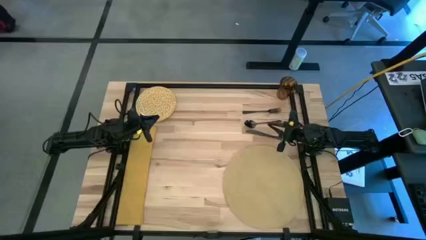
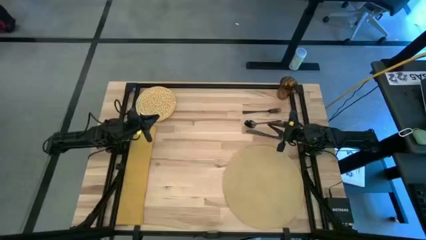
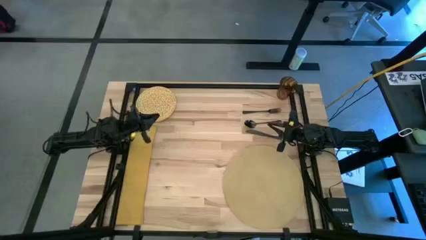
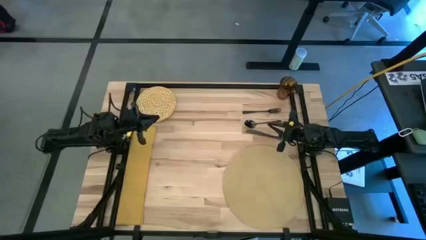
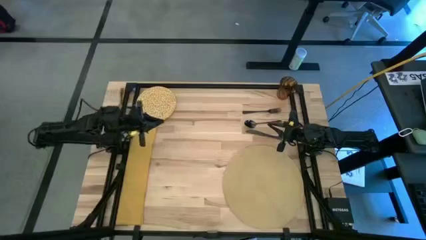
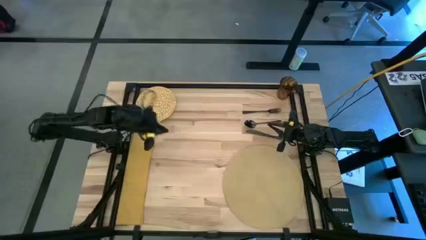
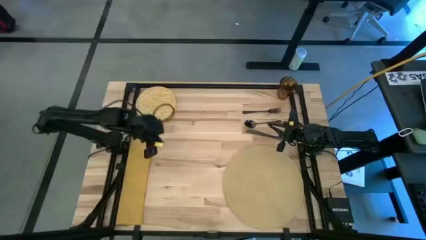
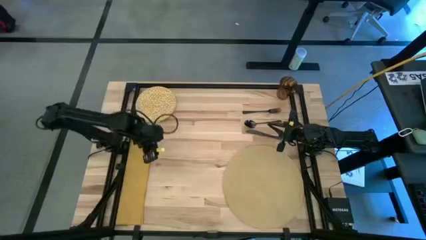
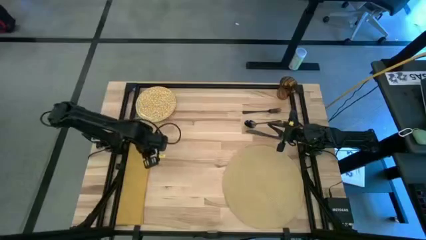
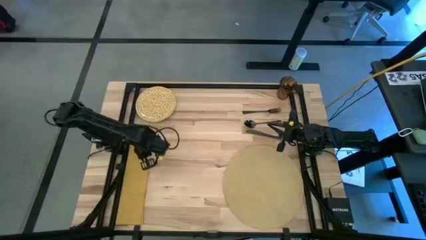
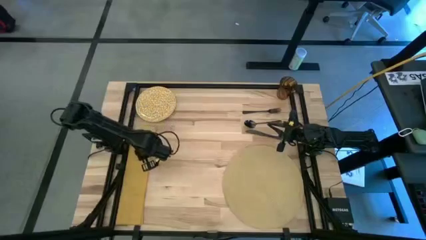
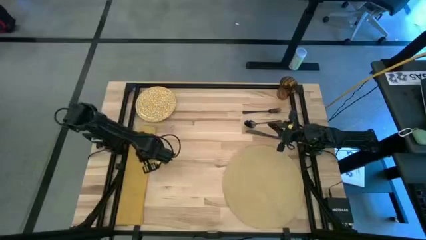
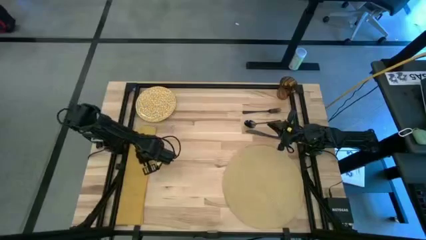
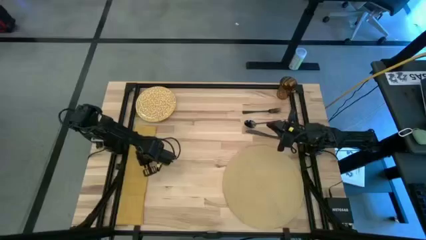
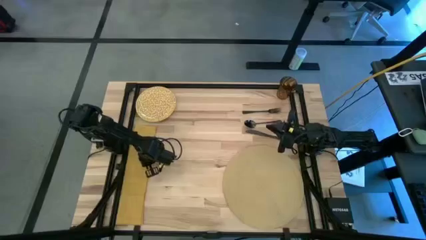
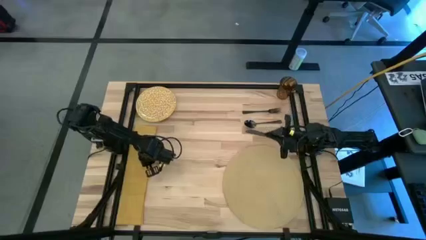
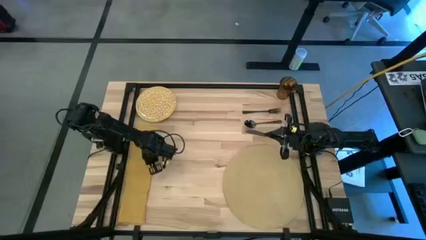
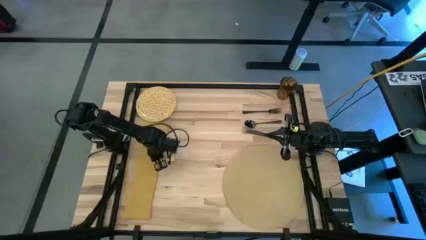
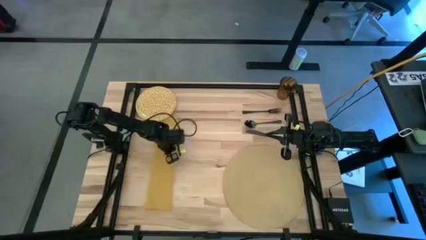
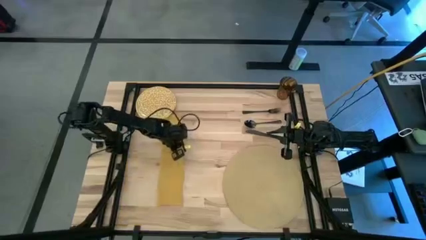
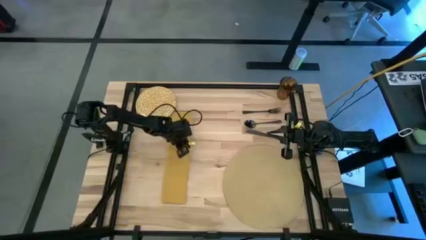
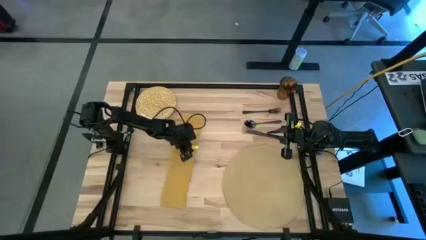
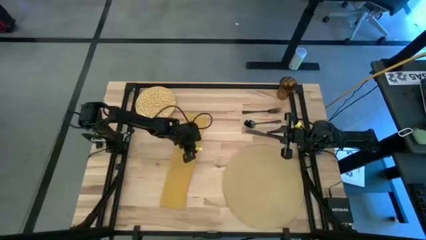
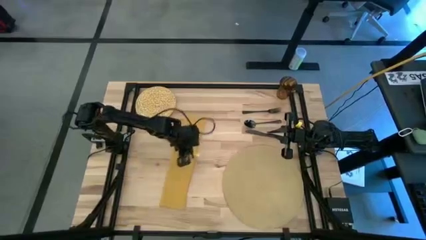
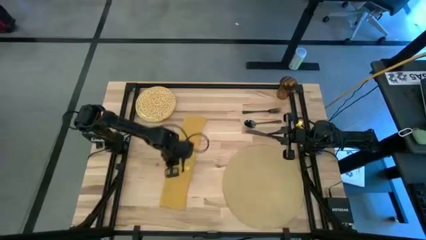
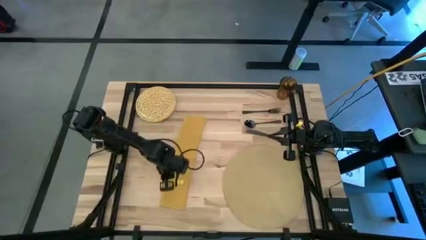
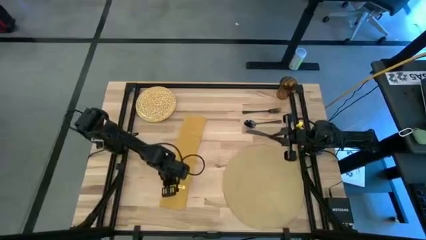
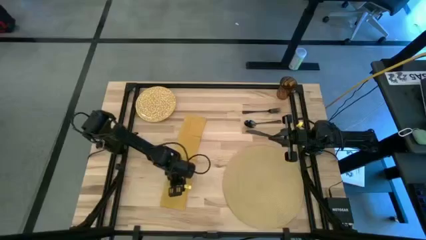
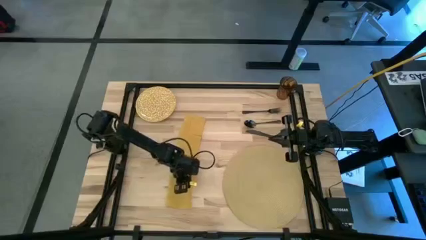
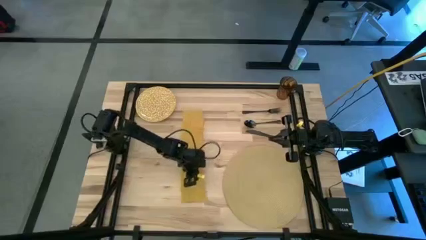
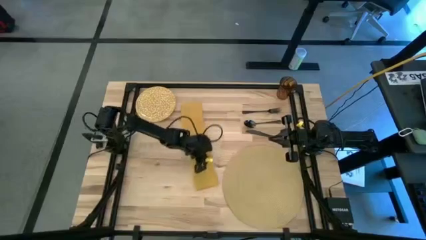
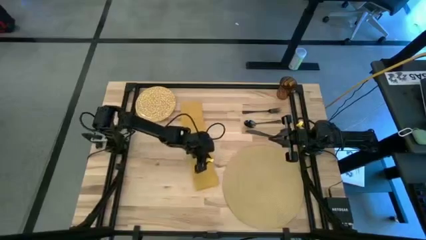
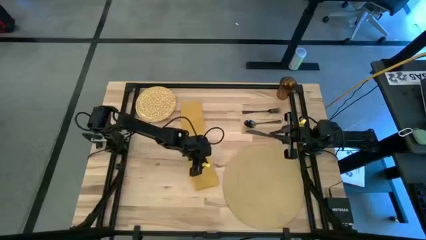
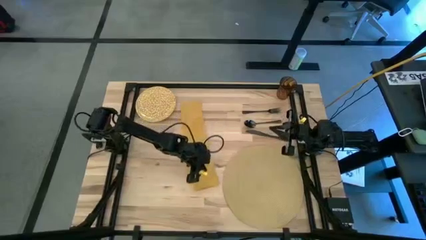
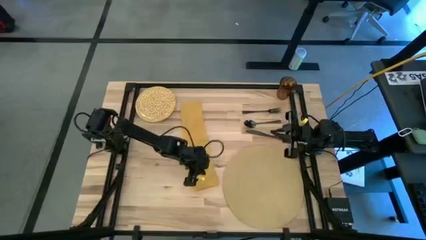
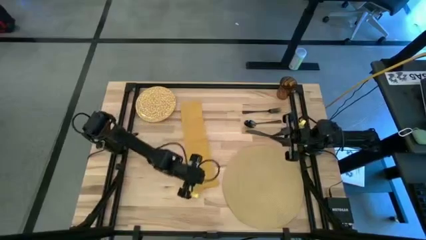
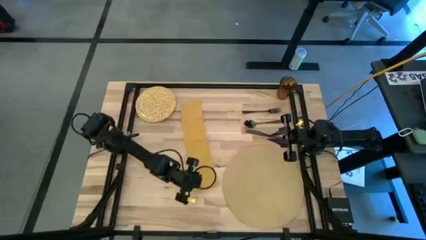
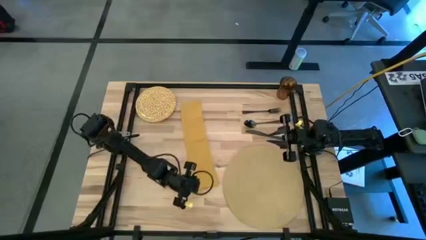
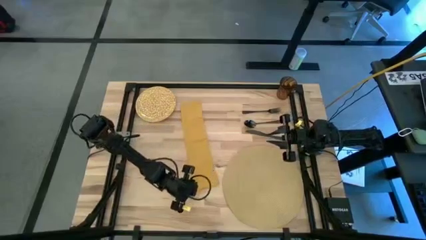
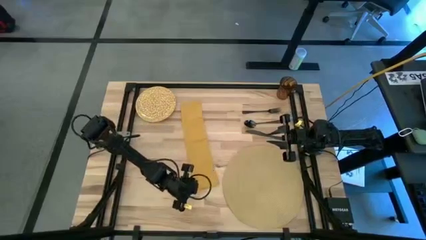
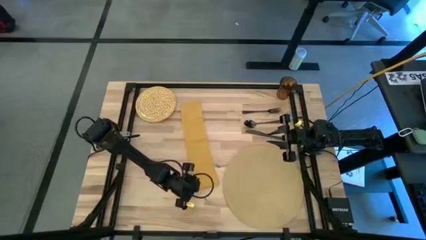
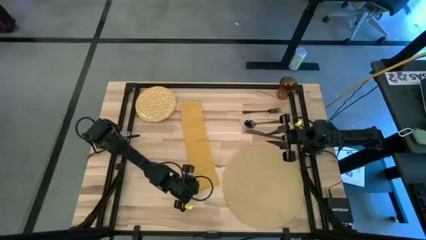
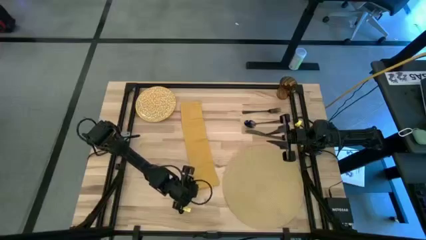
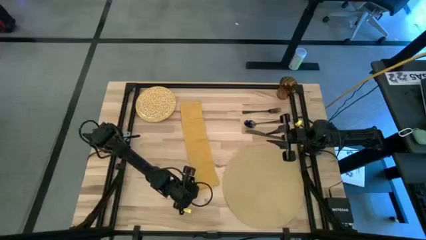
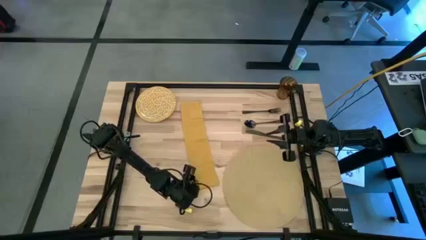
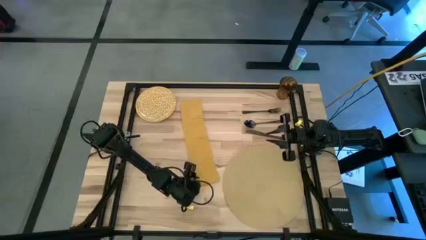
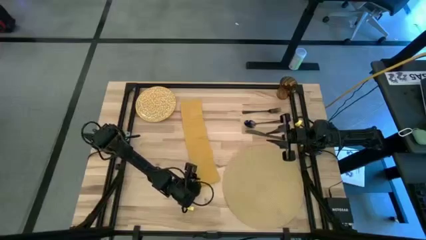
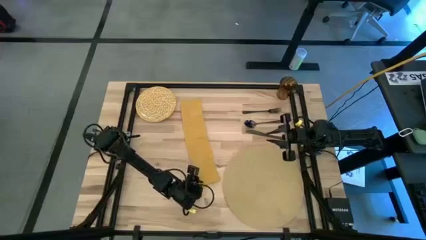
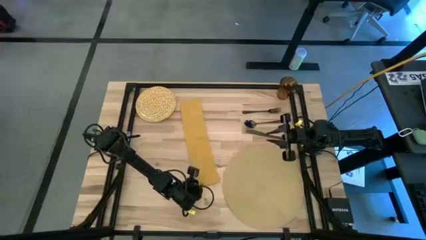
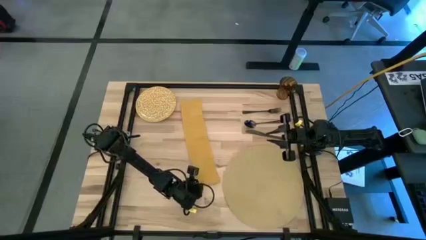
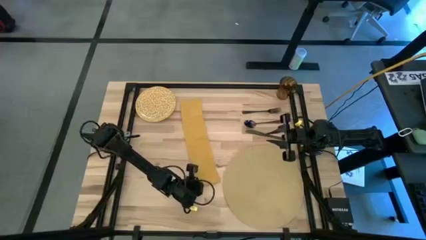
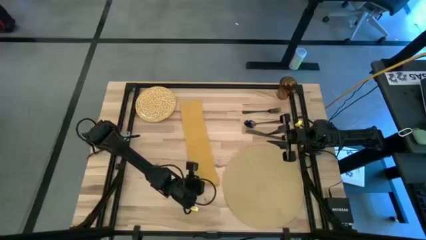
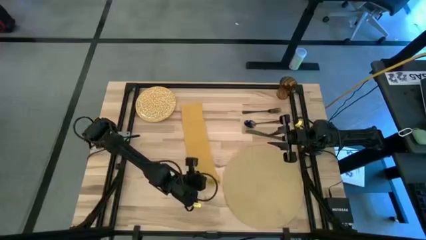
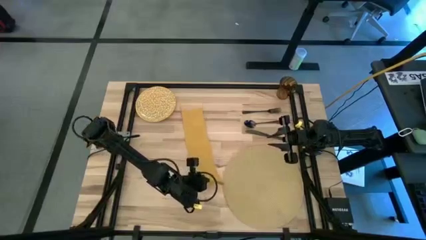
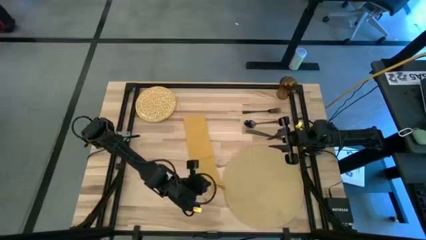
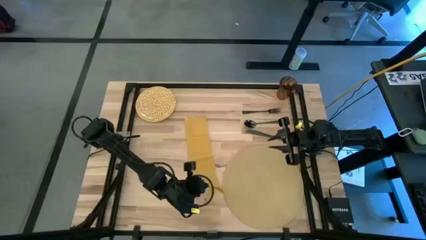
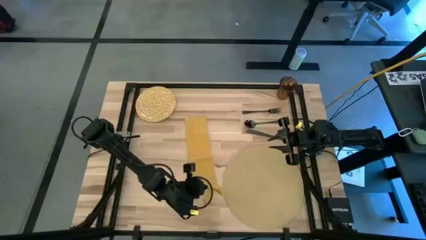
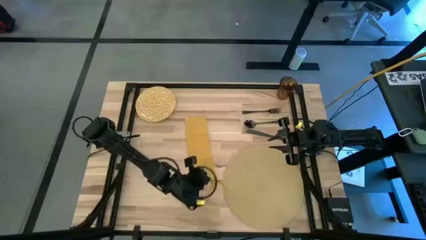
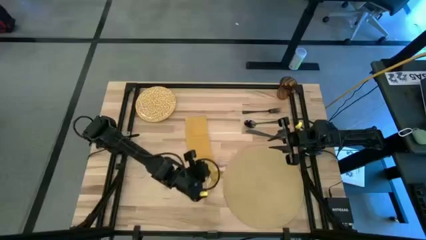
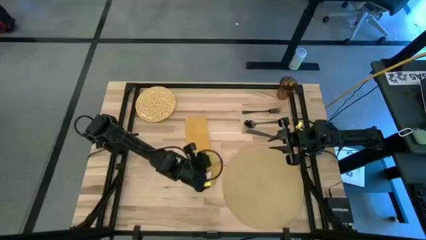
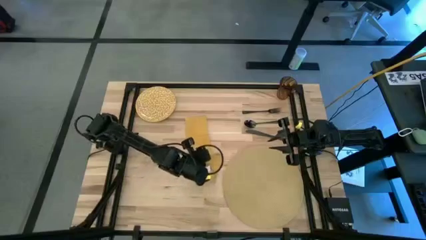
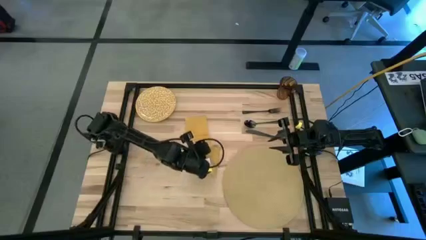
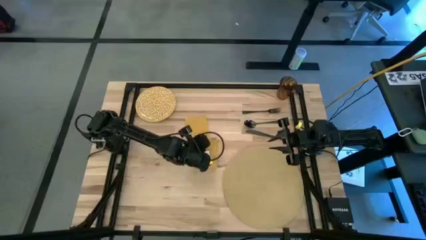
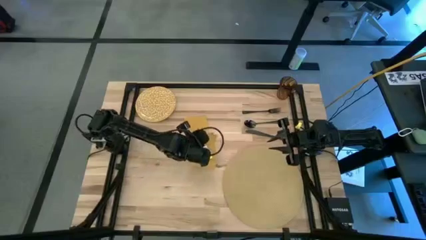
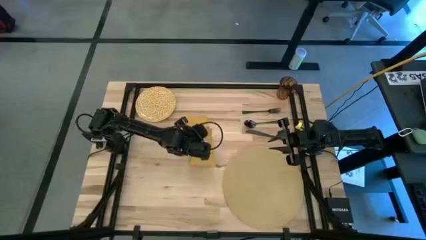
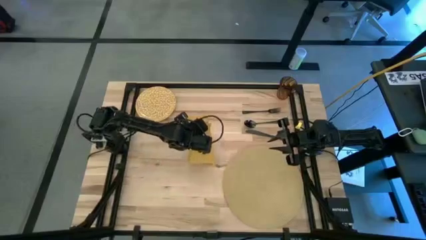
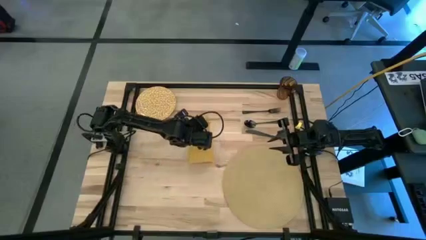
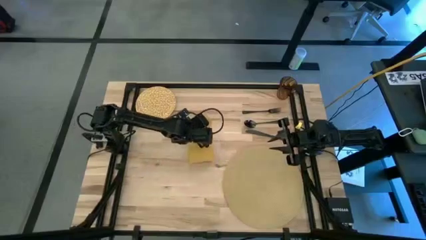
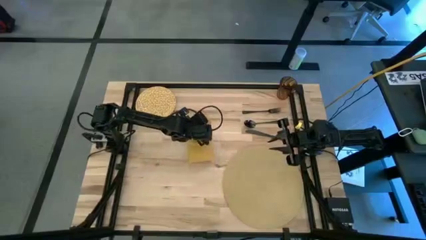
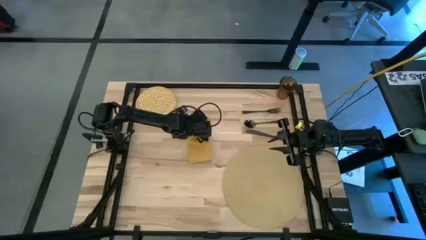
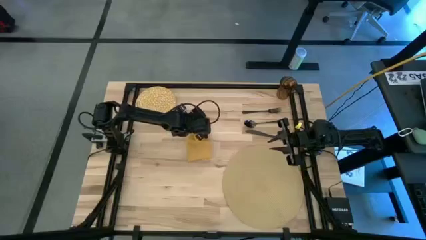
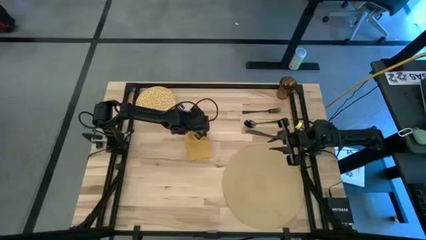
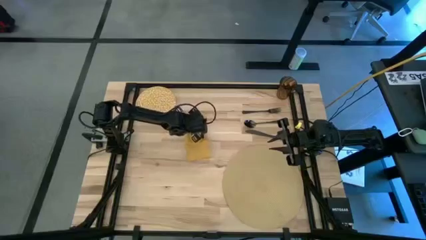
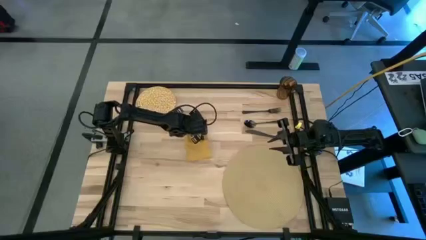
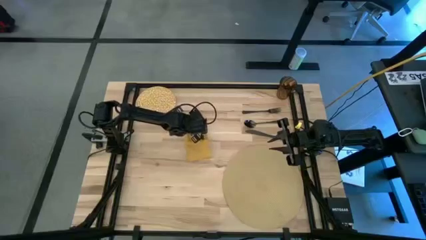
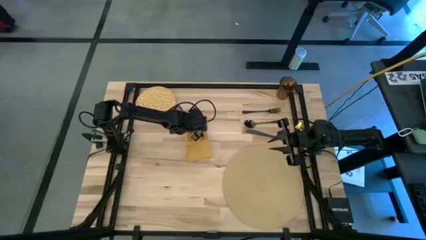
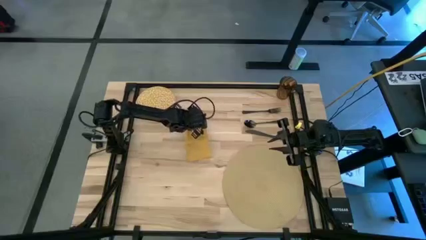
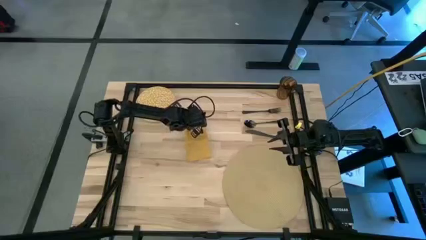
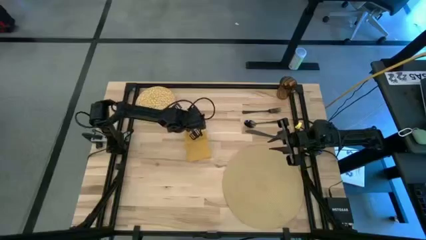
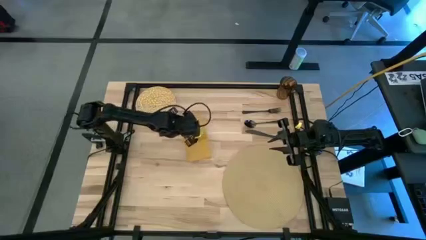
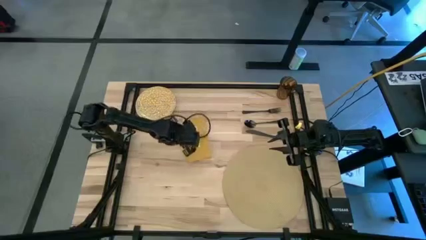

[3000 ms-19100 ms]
Task: Set table place
Fold the yellow table napkin

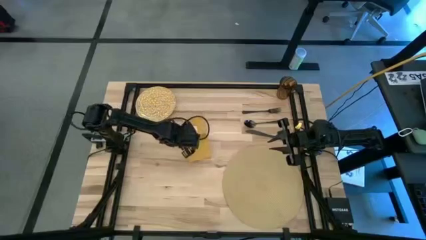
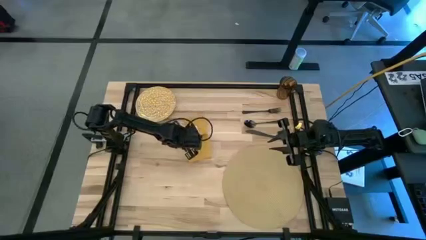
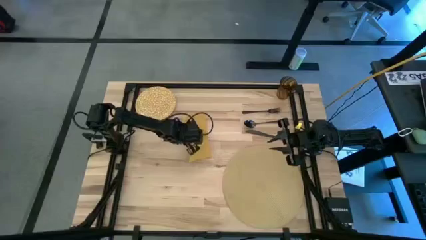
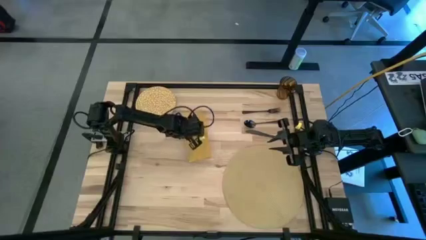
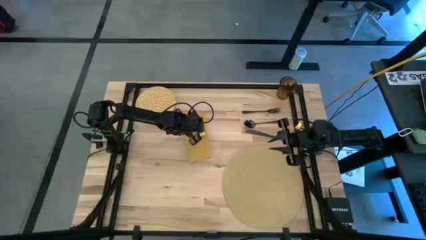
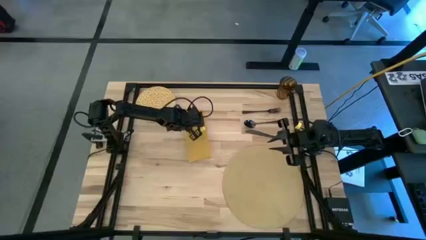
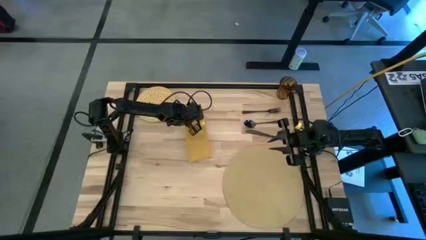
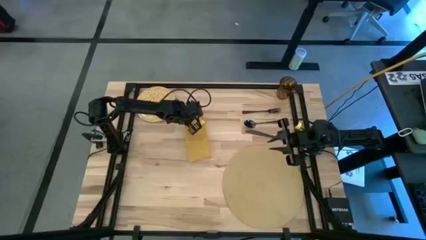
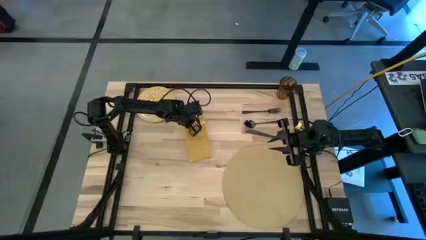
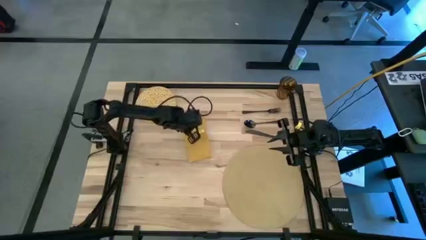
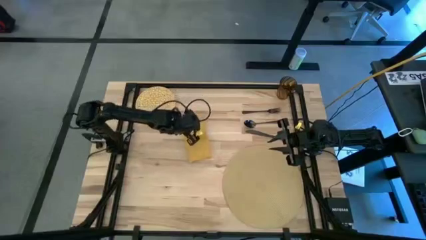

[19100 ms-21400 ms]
Fold the yellow table napkin
